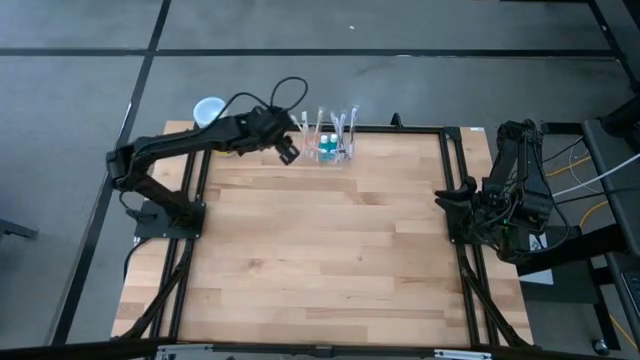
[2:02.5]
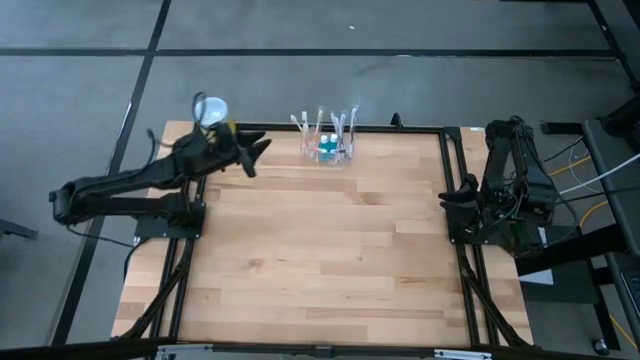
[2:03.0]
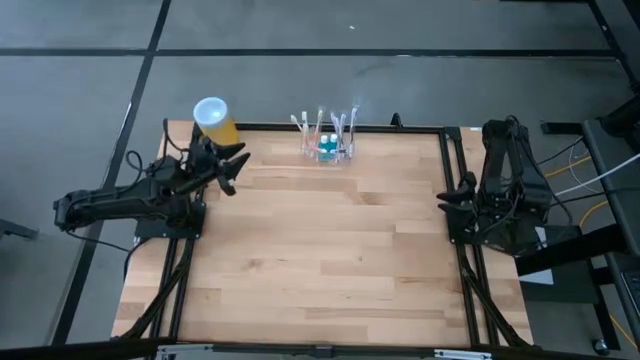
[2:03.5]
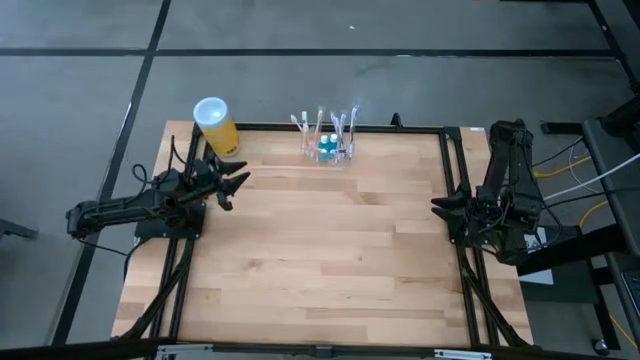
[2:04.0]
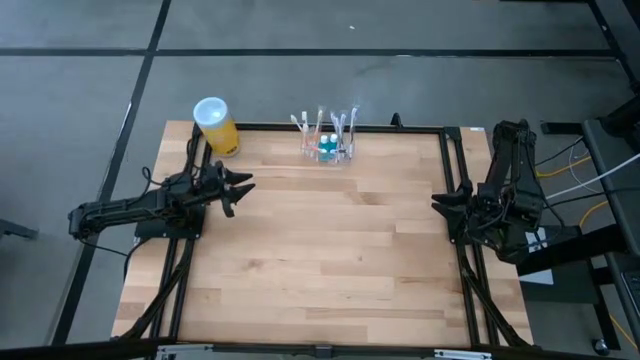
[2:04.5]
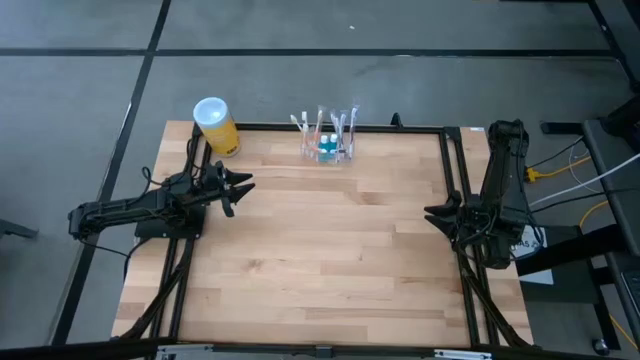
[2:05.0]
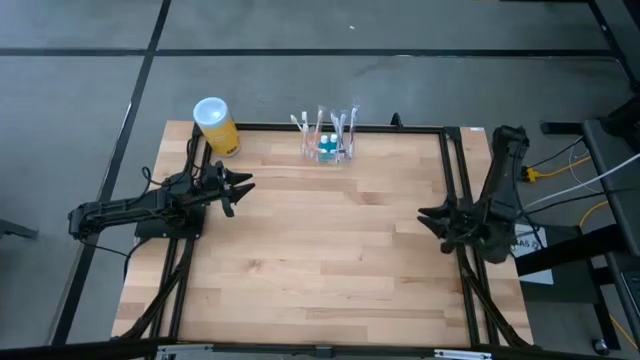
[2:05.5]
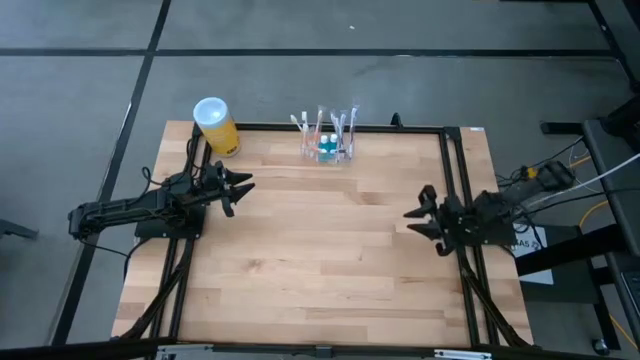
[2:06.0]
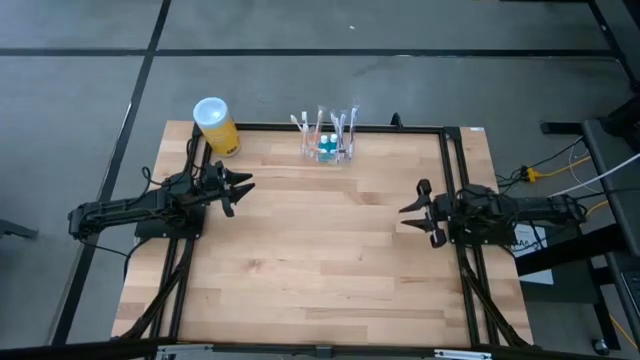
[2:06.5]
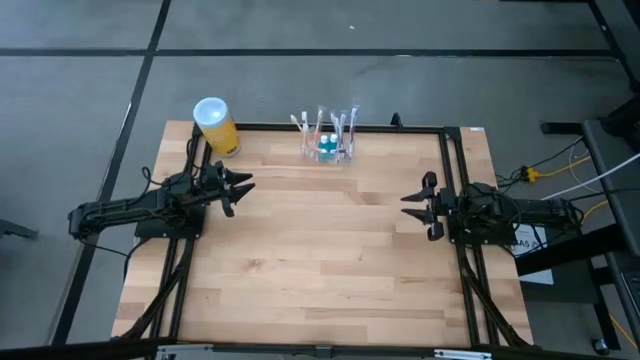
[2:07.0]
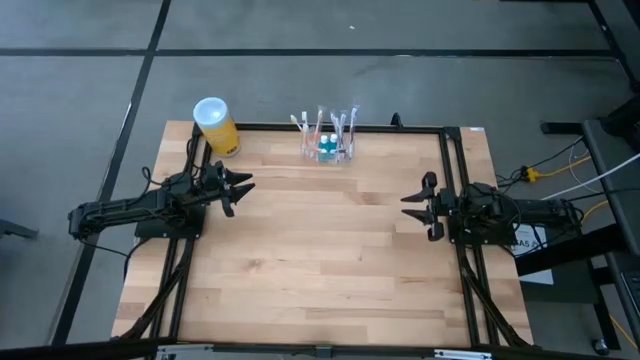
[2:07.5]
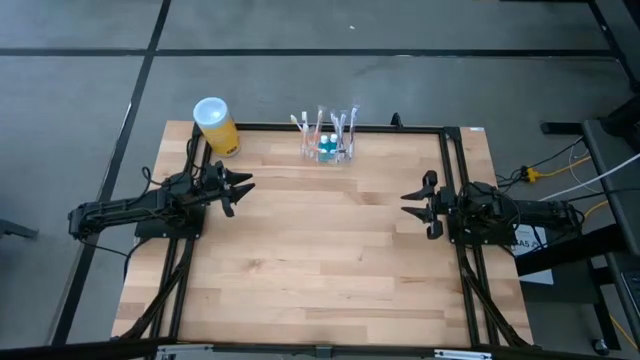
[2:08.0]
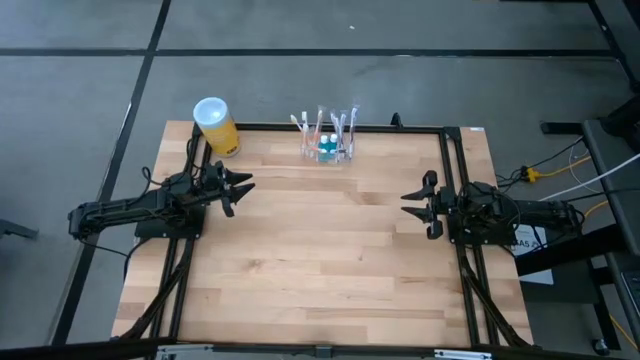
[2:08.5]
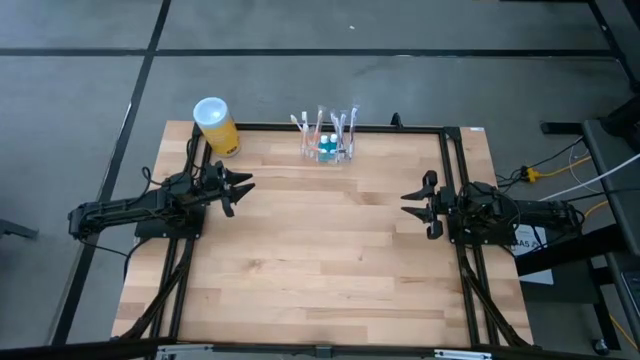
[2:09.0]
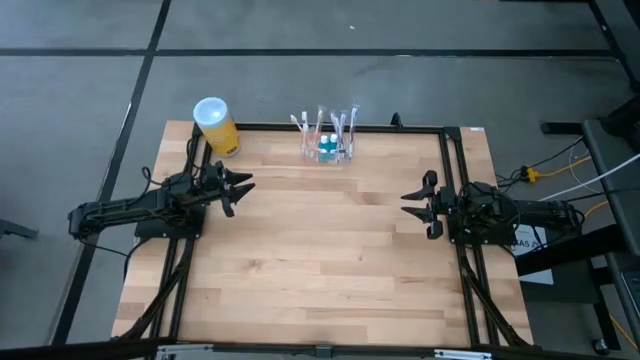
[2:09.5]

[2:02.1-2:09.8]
Task: Pick & Place toothbrushing station
Return to Home Position

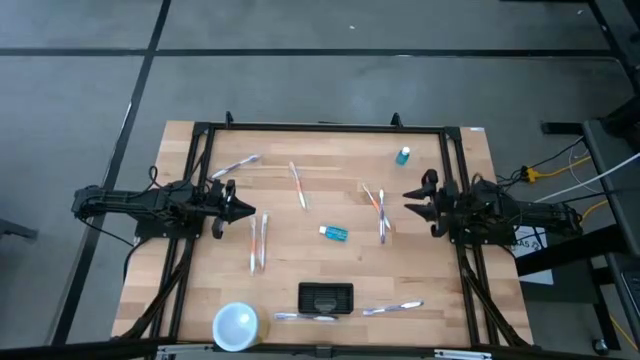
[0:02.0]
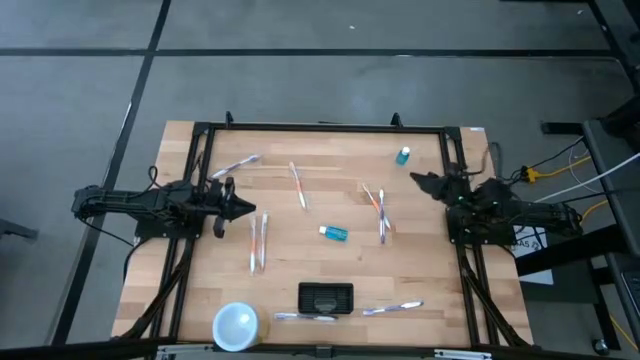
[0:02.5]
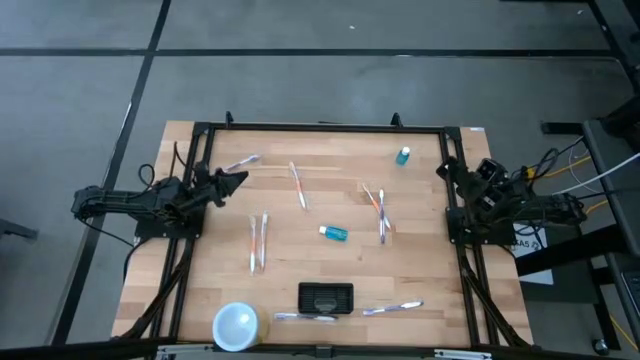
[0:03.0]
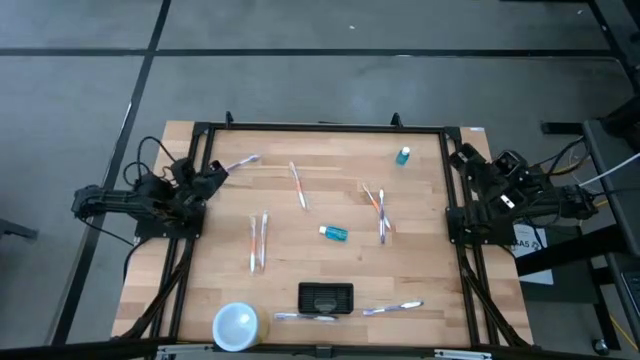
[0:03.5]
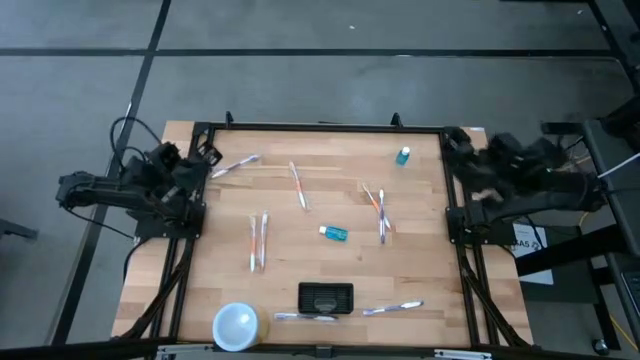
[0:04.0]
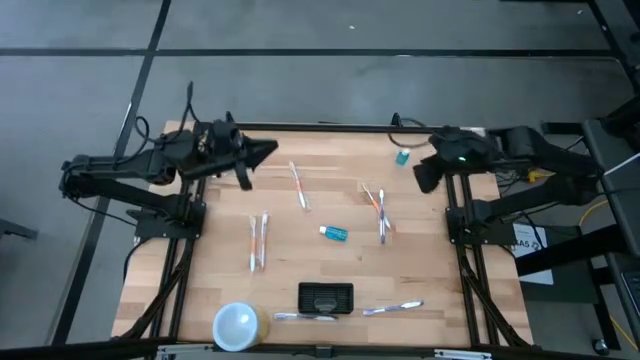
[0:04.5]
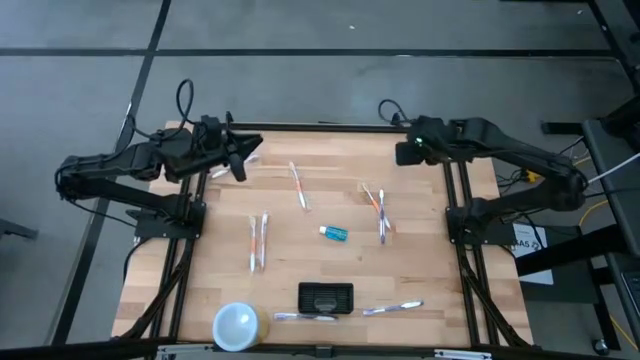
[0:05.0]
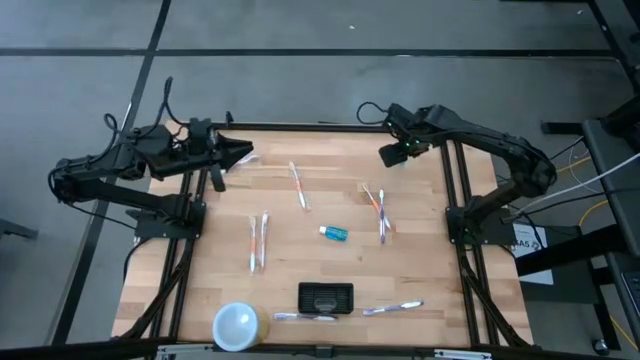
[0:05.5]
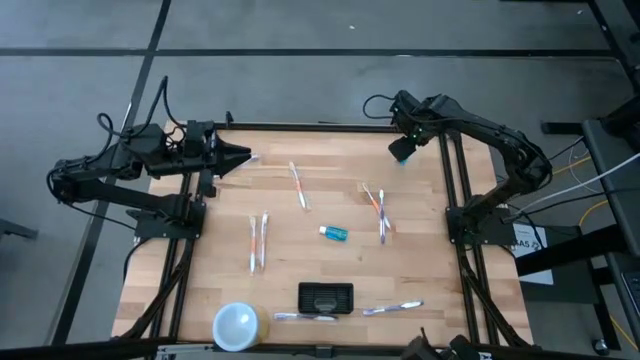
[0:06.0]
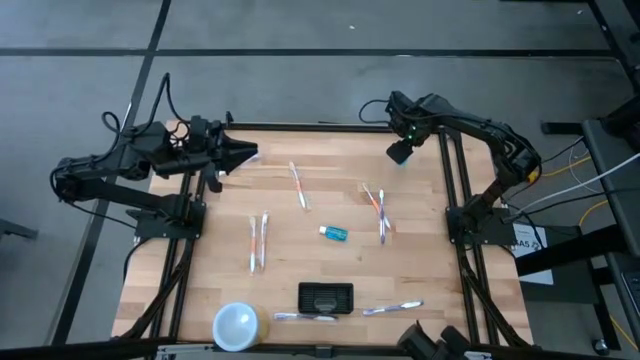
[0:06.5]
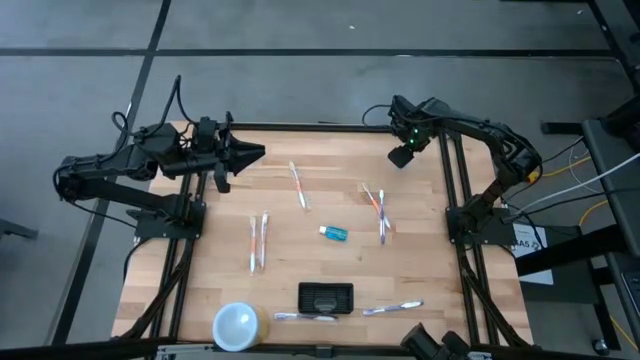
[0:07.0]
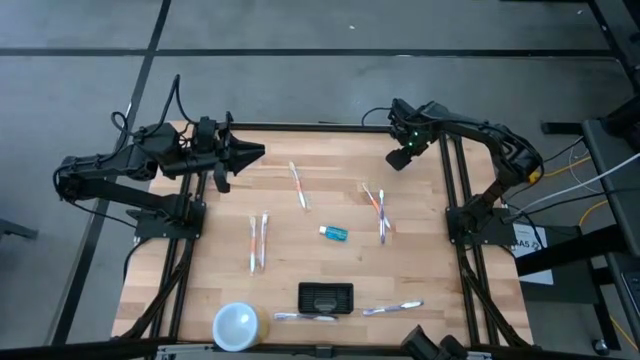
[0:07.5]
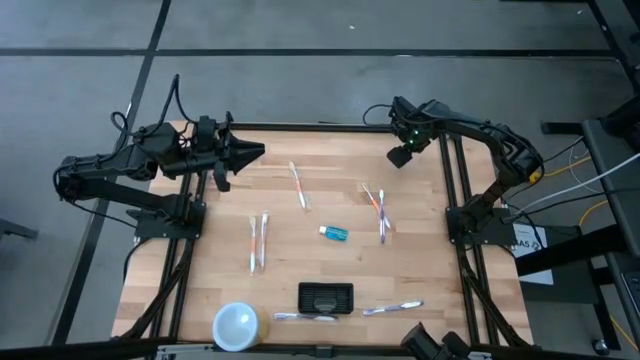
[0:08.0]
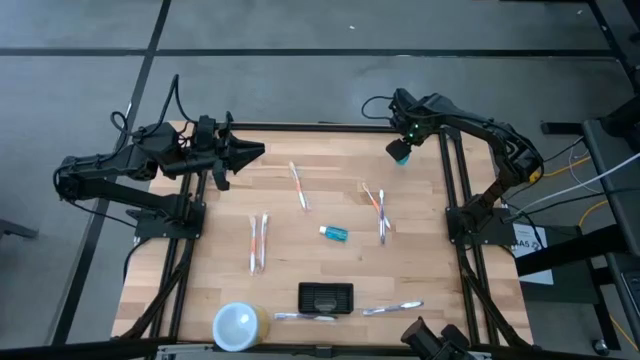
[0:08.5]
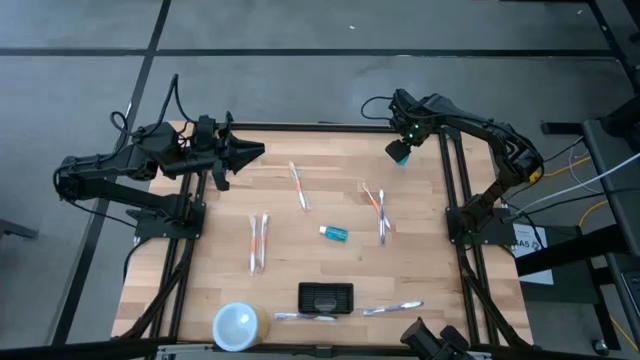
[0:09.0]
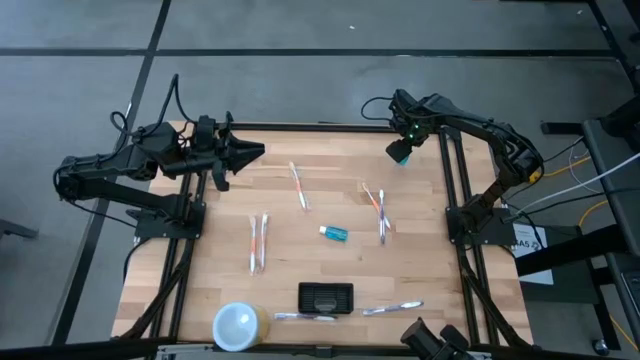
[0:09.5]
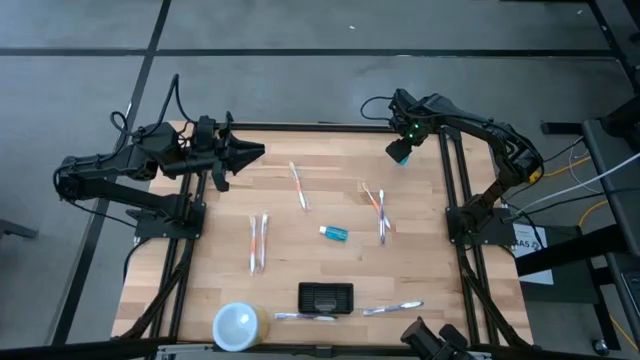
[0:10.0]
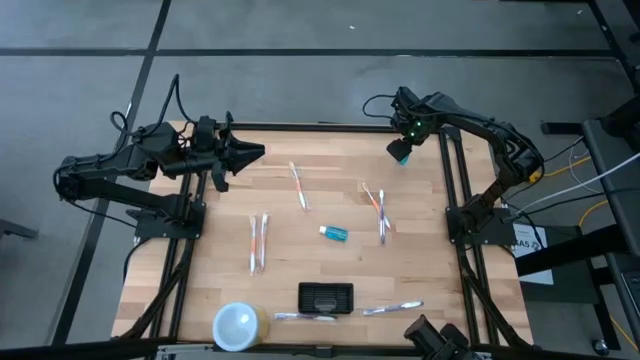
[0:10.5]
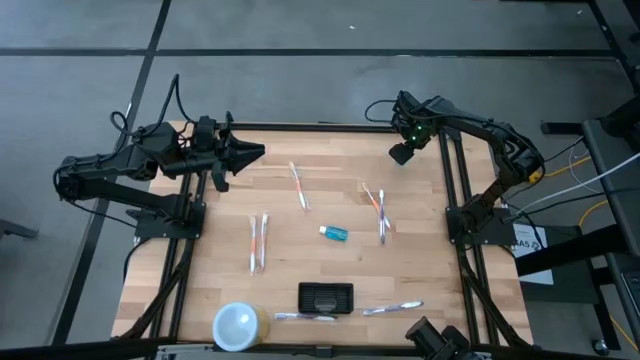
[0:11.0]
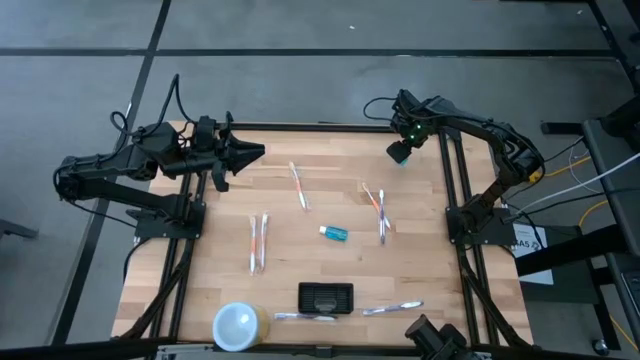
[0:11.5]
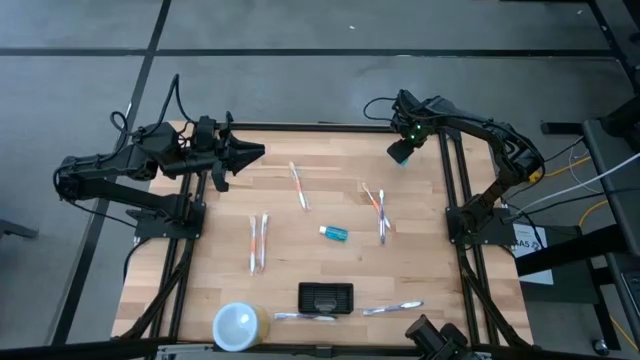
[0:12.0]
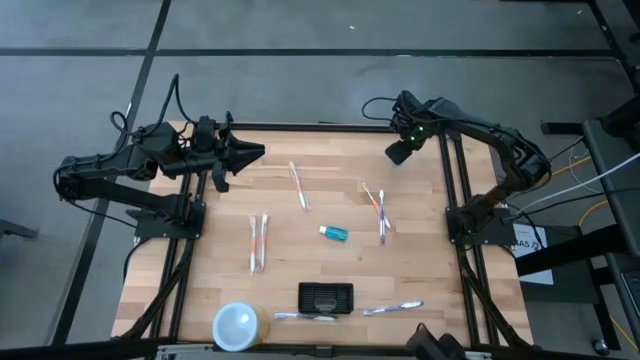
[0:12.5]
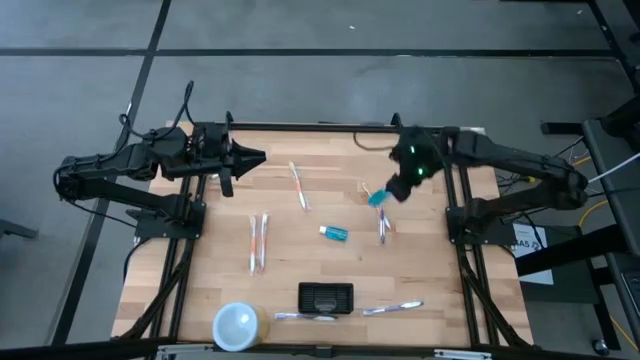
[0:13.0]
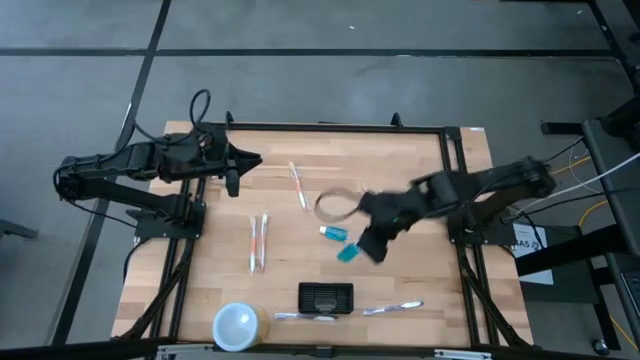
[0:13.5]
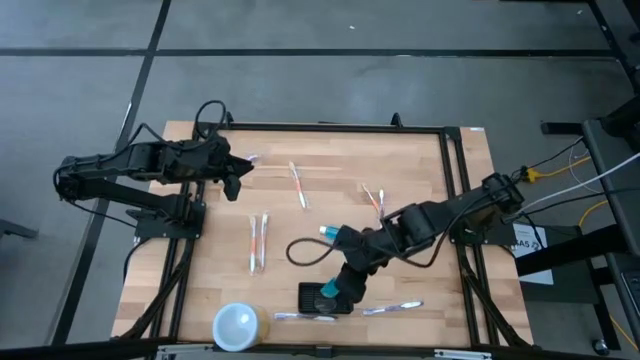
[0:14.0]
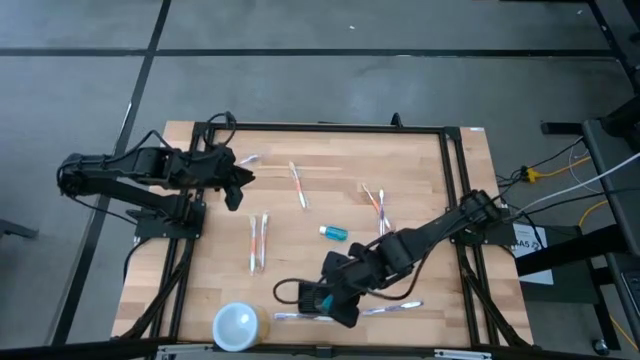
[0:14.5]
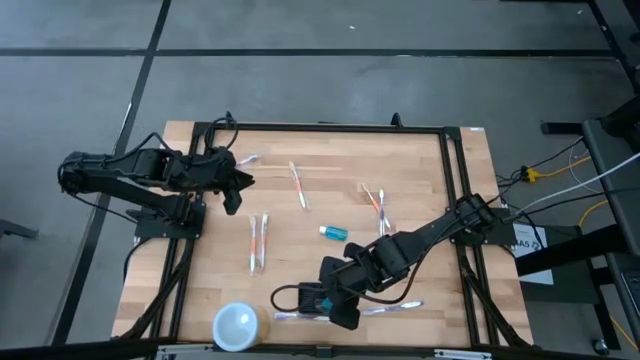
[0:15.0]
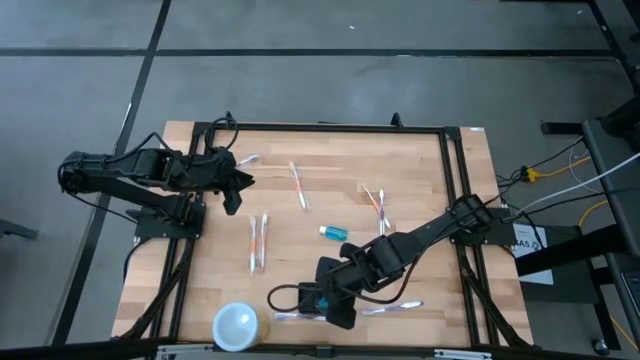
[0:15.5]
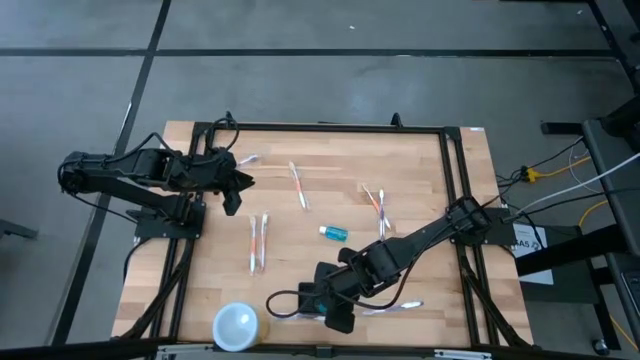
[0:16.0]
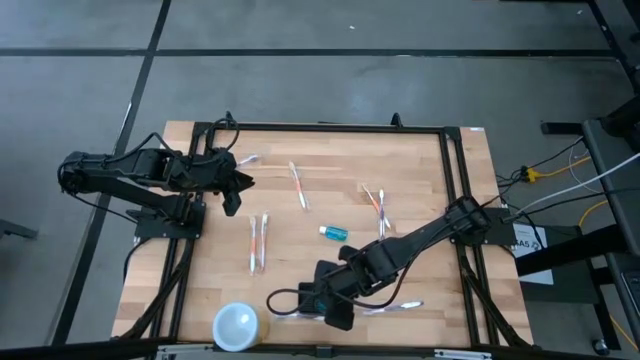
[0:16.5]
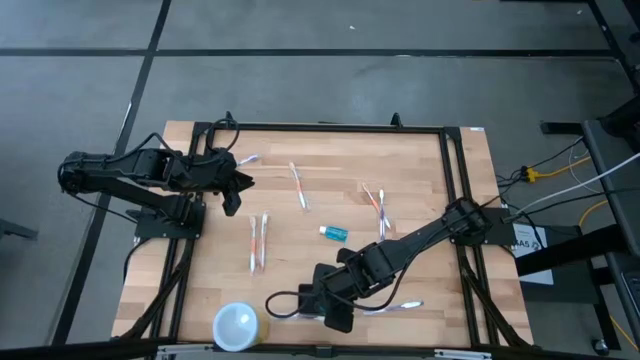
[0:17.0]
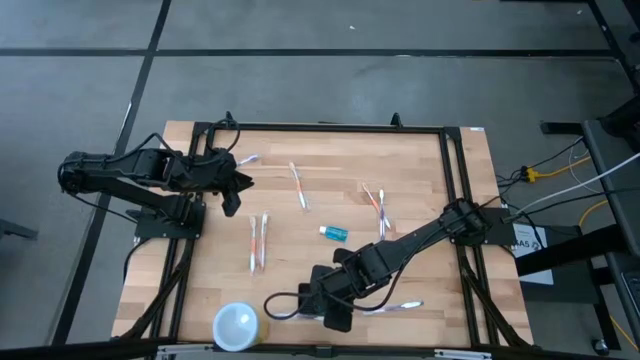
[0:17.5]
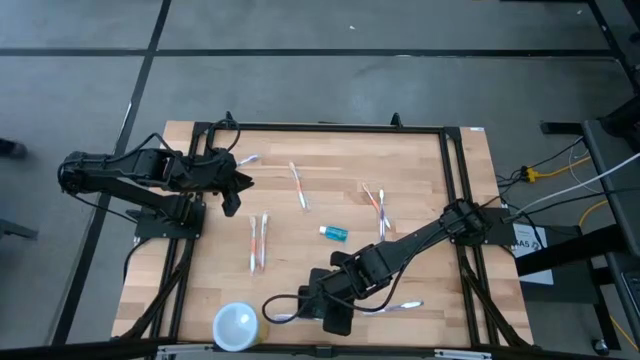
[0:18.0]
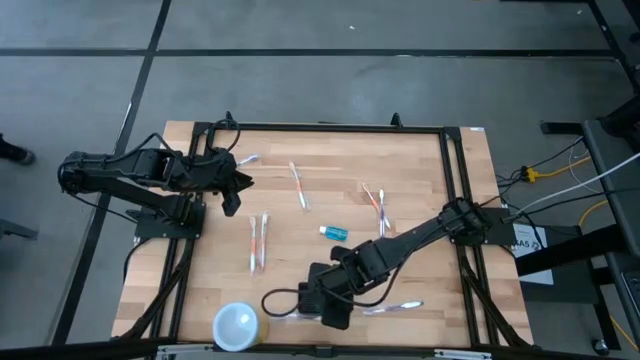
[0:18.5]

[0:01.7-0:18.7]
Task: Pick & Place toothbrushing station
Put the mouthwash into the mesh organizer
